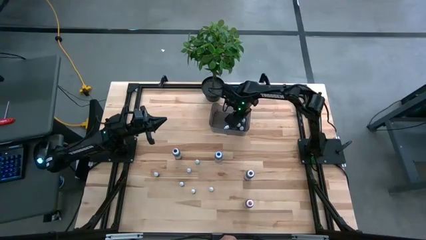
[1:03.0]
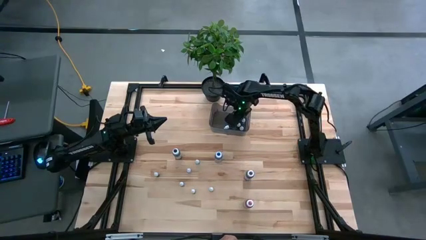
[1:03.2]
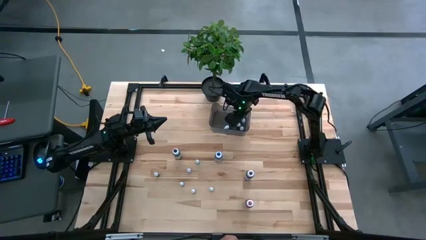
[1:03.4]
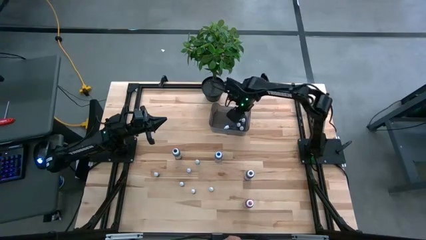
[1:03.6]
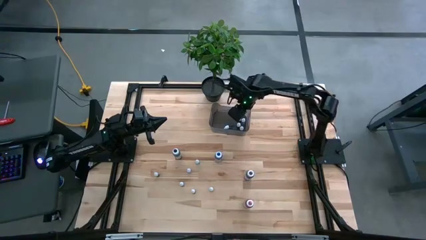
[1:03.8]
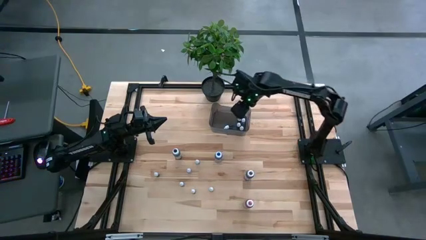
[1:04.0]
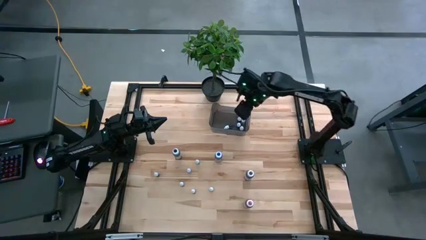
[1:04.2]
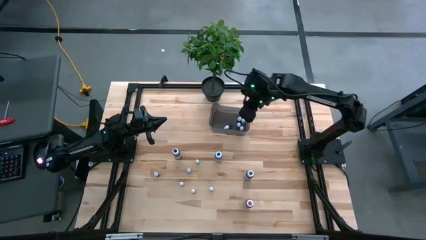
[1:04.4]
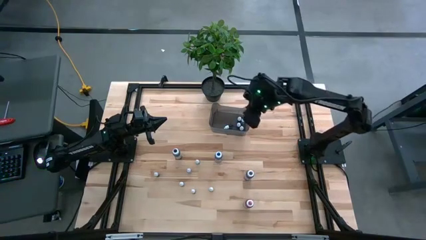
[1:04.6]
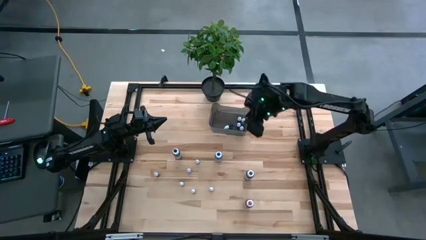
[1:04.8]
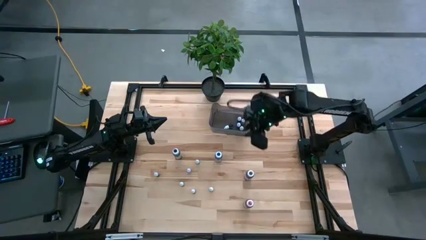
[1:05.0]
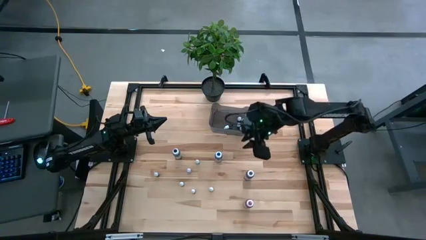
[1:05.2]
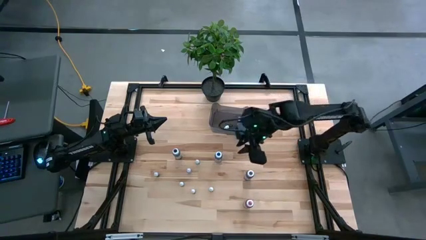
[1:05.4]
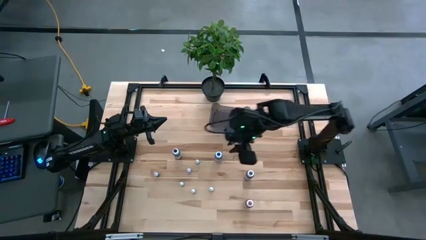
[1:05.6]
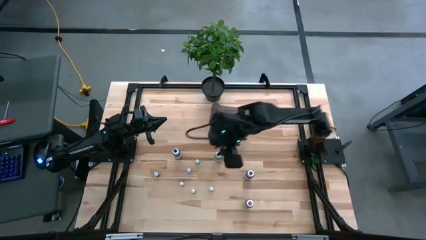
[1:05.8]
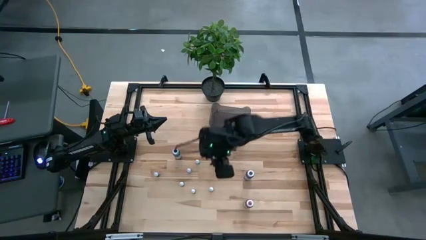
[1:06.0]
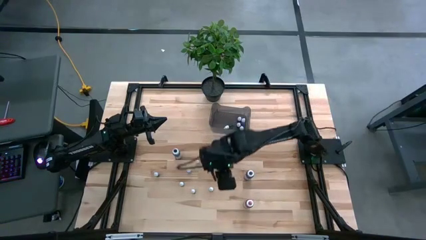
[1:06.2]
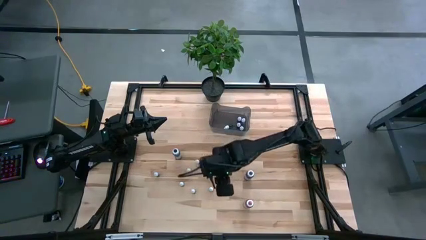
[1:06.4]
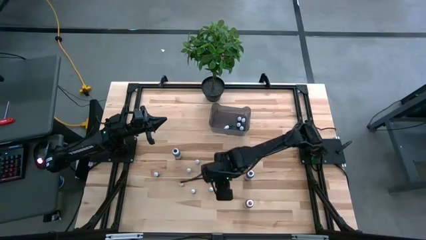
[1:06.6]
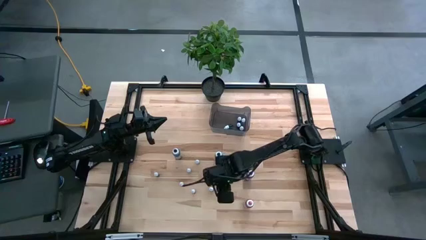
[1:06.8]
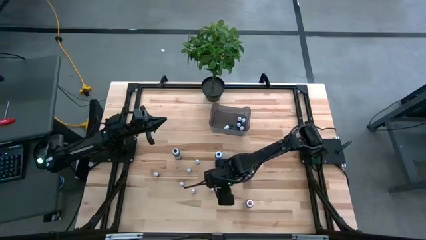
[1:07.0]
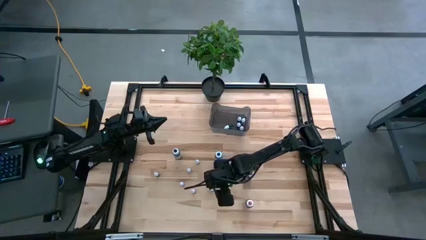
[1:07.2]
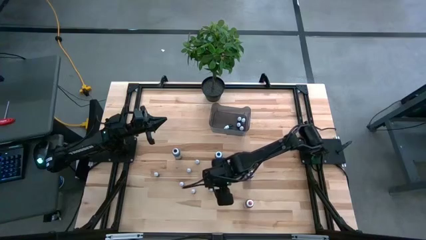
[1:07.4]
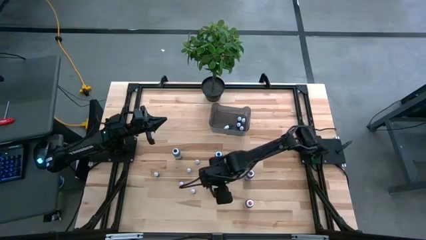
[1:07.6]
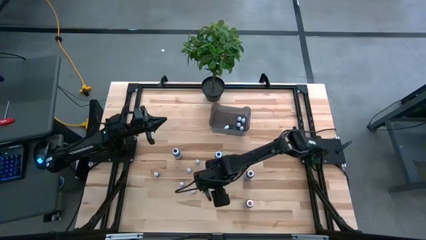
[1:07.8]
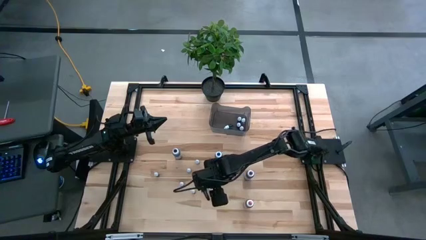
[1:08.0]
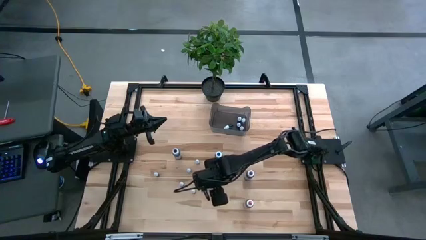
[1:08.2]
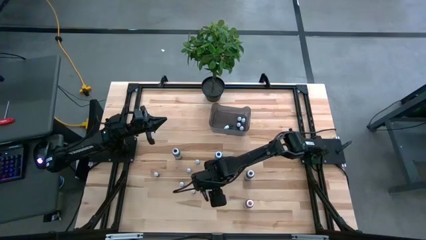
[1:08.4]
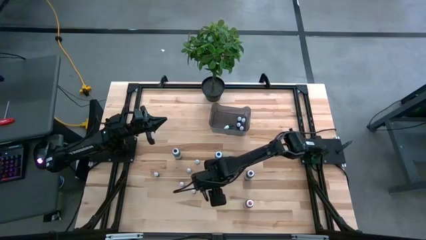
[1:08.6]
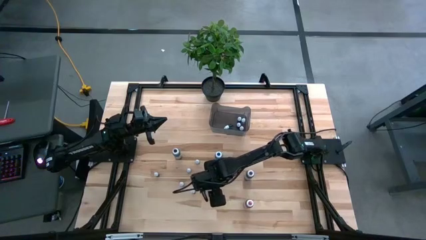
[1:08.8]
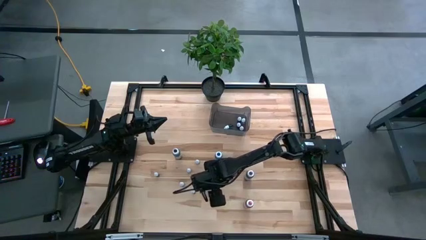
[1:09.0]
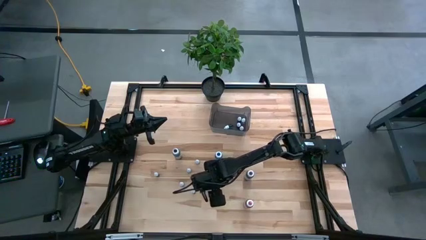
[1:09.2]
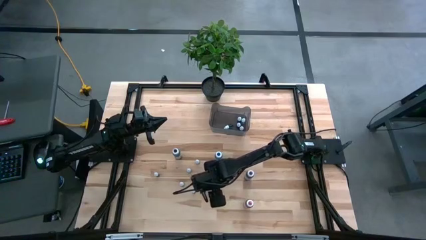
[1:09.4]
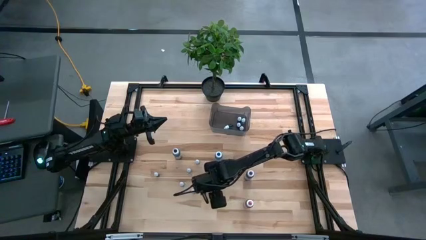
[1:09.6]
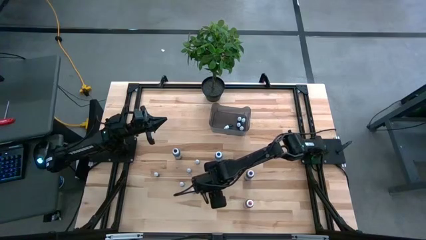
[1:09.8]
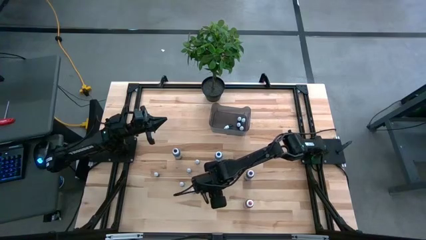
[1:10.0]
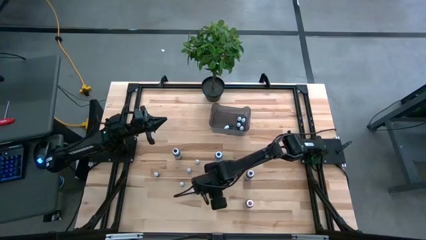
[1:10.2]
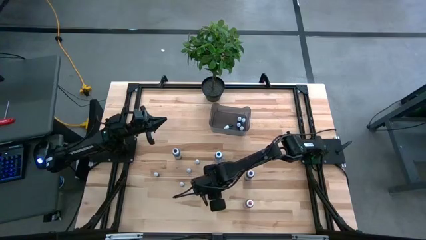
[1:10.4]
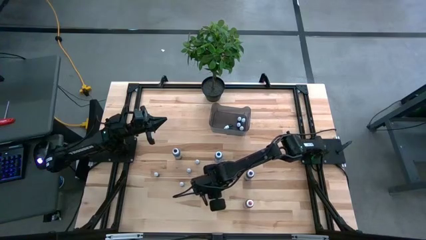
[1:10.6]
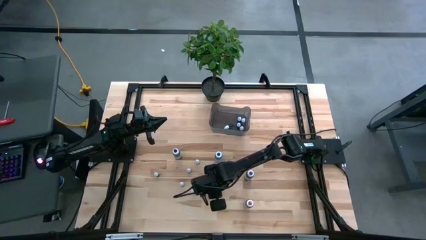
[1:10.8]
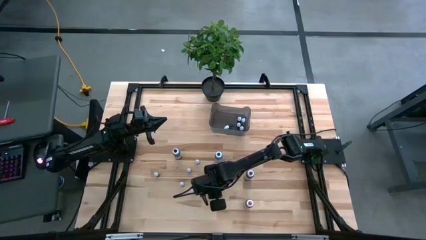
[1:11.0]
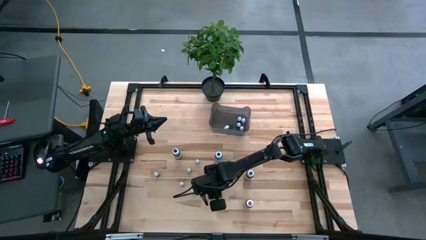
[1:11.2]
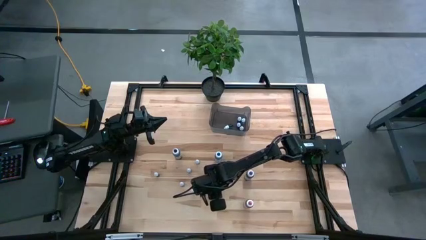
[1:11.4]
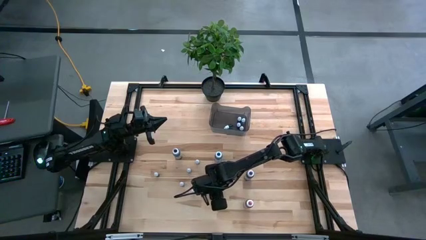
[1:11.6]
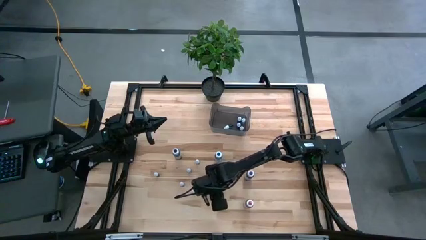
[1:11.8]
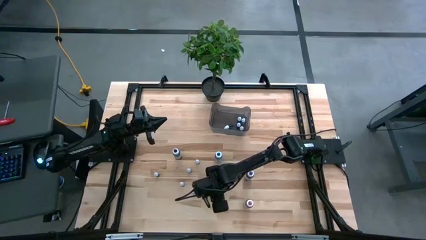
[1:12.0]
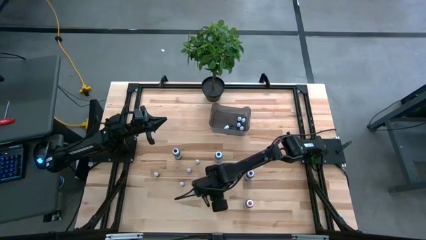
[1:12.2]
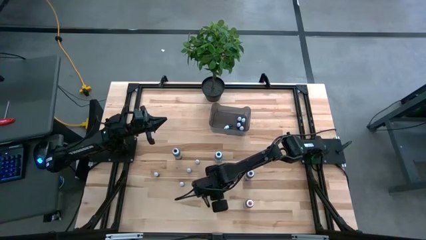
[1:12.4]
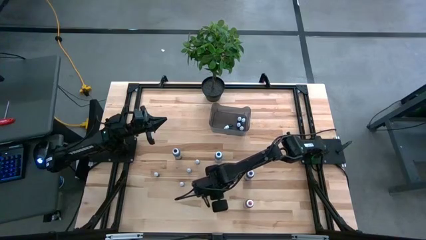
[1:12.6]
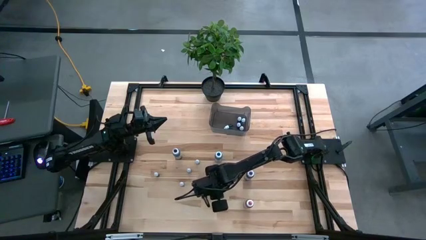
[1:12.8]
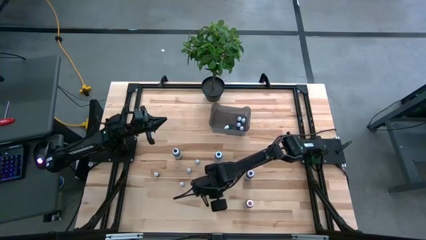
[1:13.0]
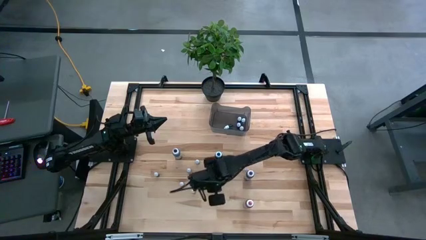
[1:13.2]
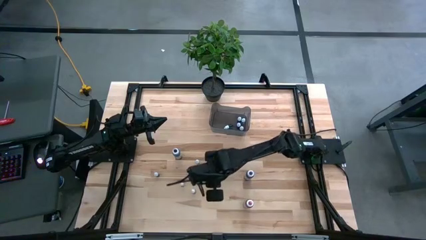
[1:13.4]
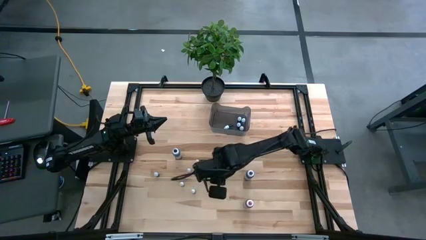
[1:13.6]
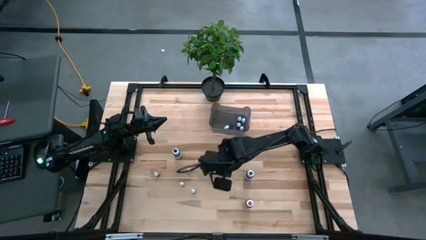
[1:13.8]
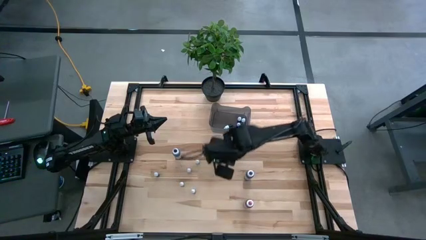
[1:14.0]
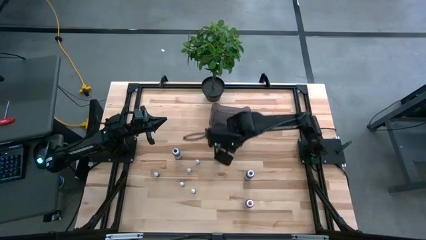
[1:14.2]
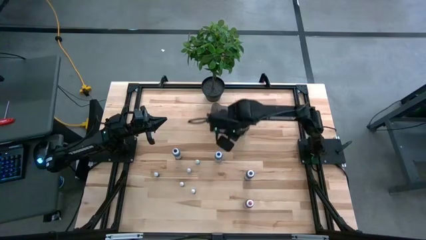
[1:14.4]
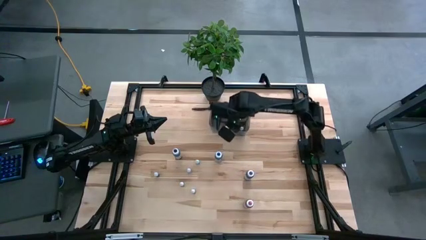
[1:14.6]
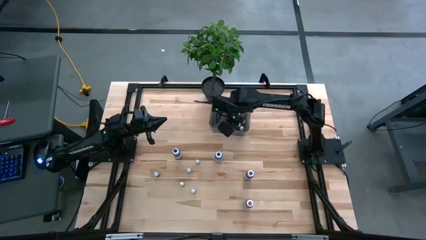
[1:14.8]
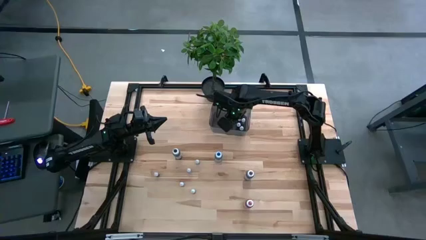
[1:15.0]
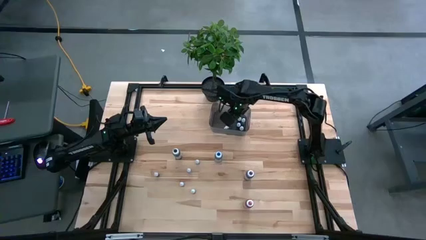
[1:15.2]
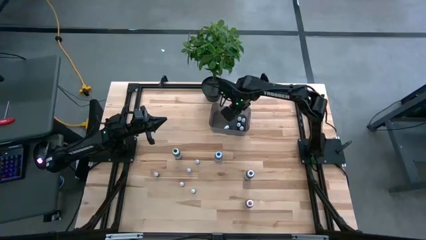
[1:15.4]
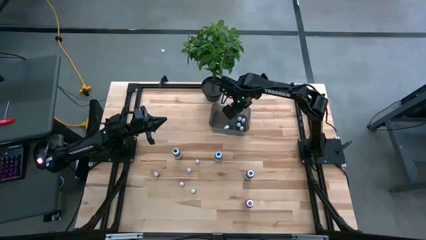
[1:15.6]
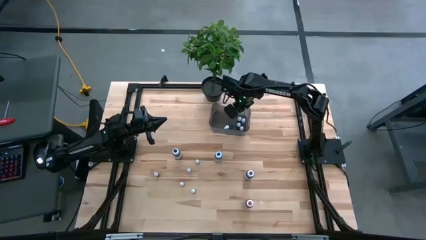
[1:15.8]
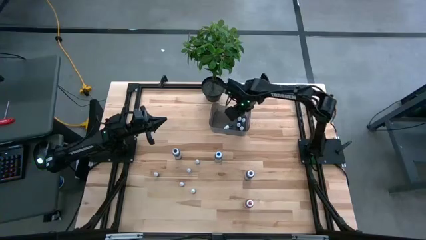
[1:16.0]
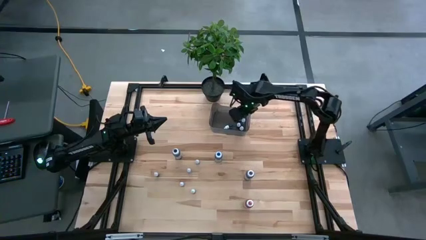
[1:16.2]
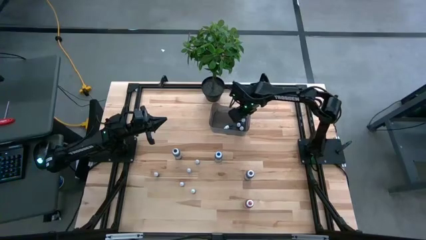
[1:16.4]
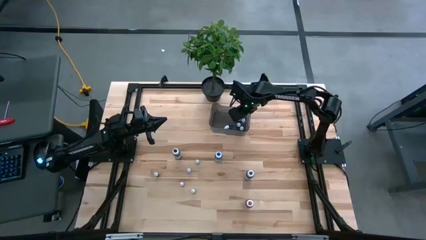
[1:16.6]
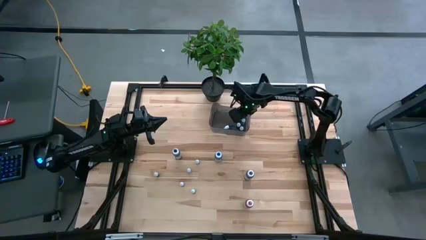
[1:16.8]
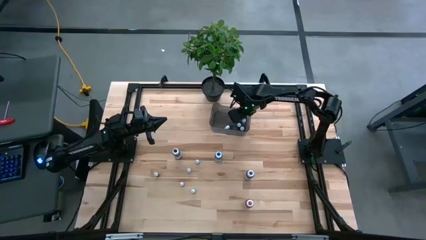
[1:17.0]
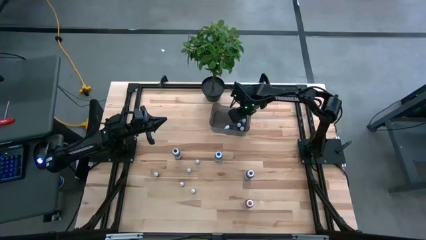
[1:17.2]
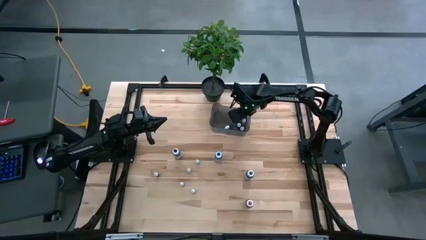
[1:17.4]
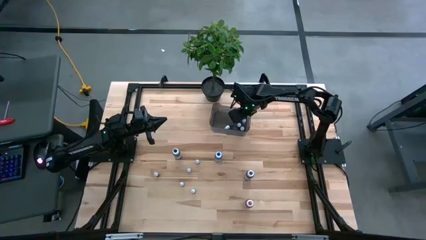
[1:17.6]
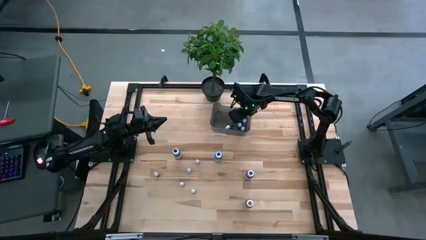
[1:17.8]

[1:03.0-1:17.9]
Task: Pick & Place food coloring
Put the small black food coloring bottle into the black bin

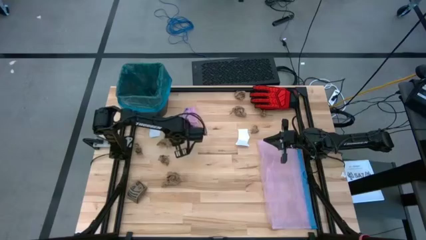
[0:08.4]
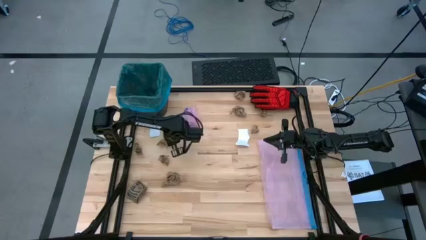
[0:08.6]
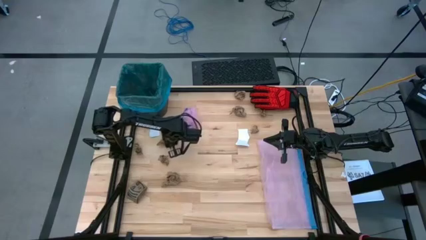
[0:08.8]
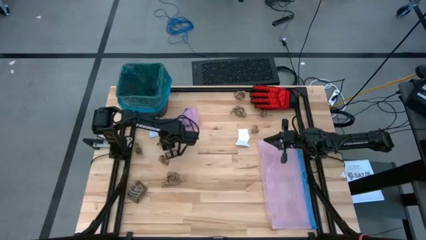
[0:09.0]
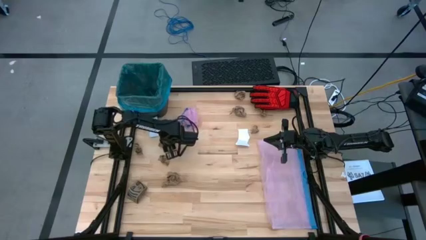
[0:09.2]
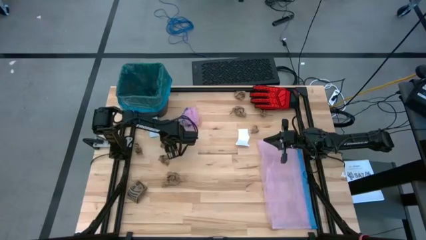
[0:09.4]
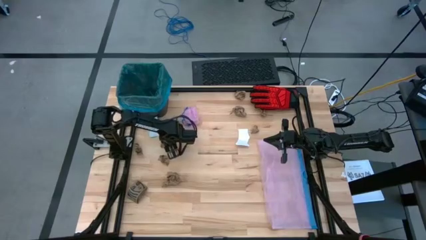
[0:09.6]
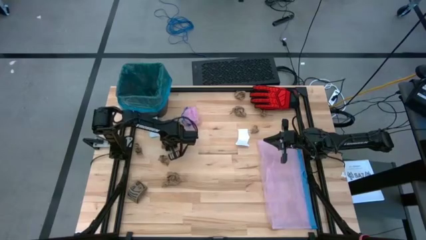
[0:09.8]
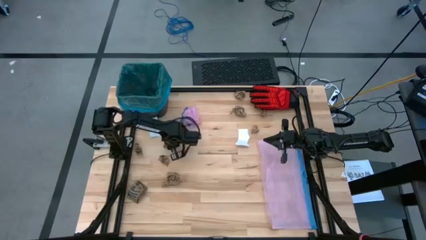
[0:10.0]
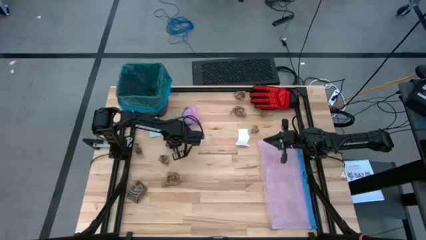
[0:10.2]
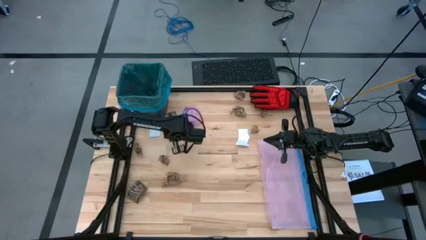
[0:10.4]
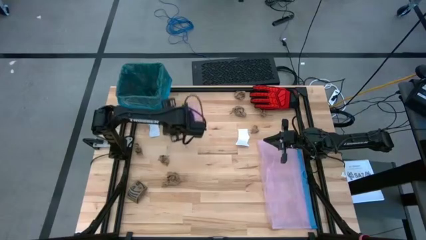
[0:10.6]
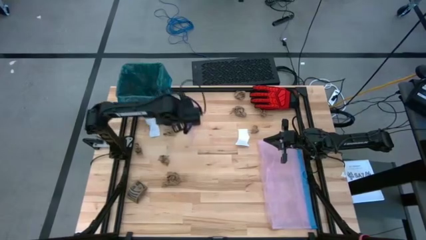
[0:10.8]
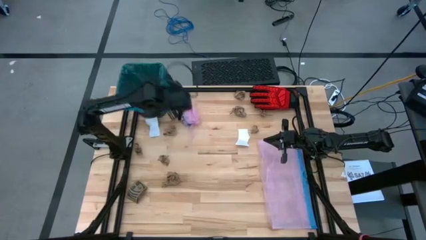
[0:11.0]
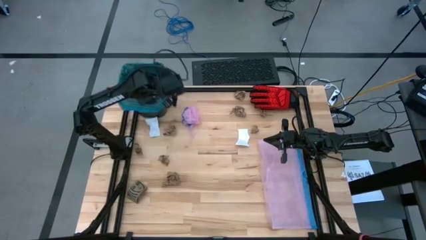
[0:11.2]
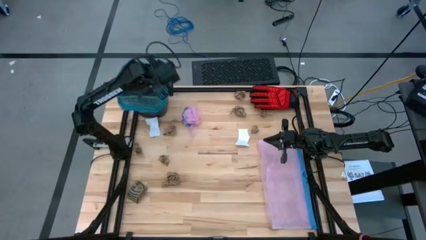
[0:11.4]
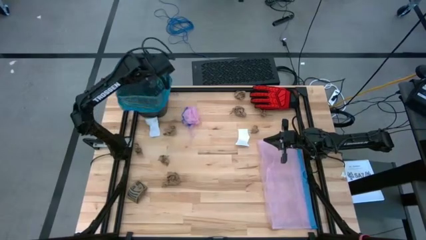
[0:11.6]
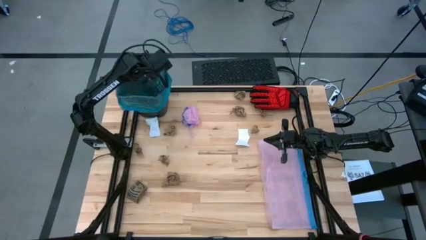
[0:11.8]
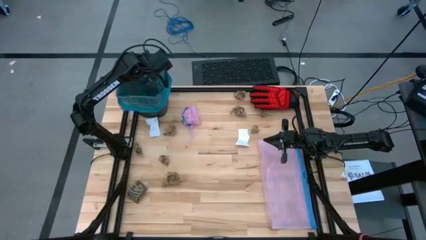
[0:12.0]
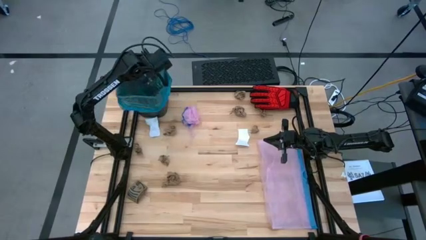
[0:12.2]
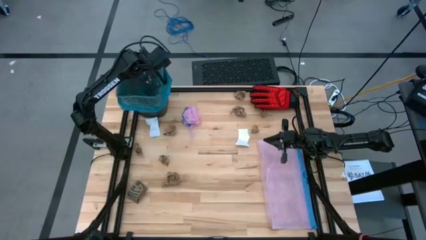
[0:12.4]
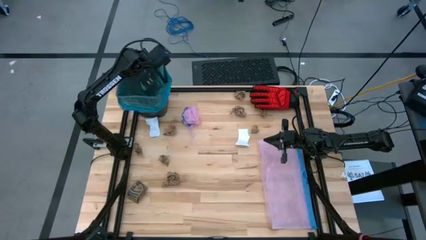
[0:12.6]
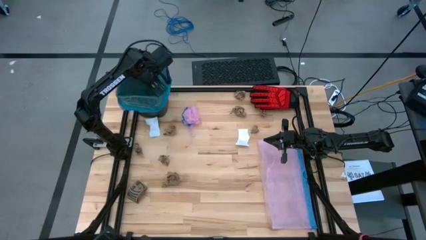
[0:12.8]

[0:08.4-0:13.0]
Task: place trash/remove bag and relplace
Put the brown napkin into the black trash bin
